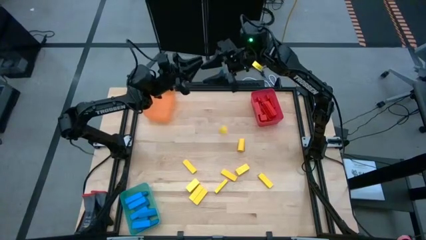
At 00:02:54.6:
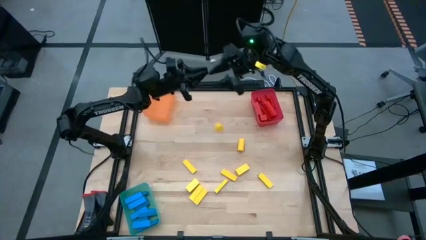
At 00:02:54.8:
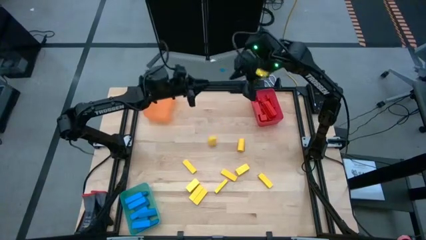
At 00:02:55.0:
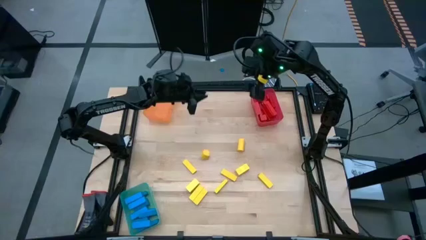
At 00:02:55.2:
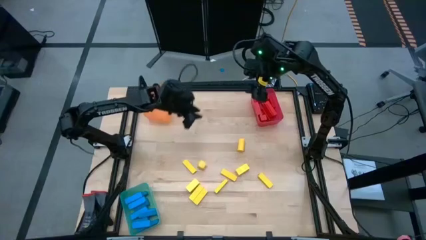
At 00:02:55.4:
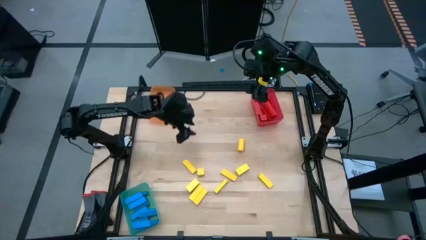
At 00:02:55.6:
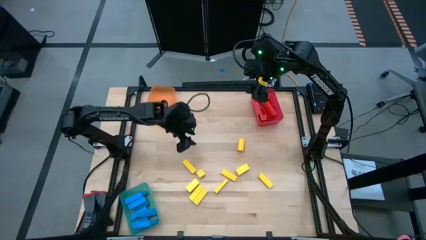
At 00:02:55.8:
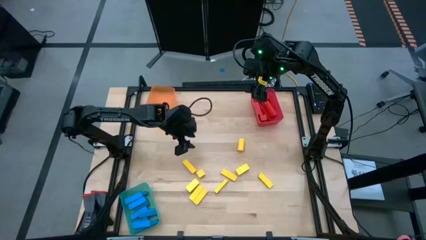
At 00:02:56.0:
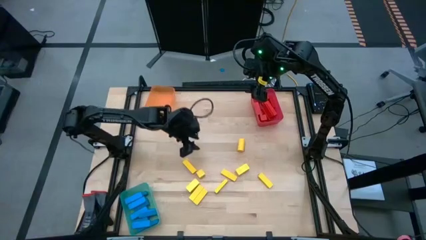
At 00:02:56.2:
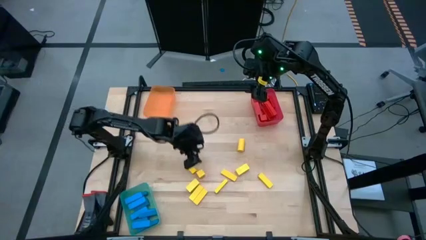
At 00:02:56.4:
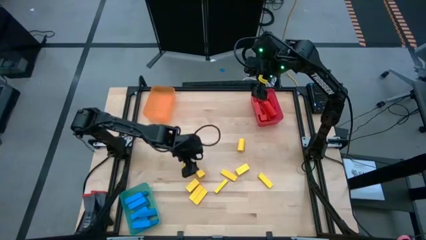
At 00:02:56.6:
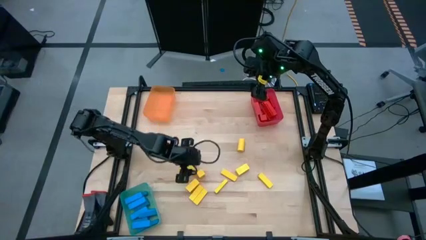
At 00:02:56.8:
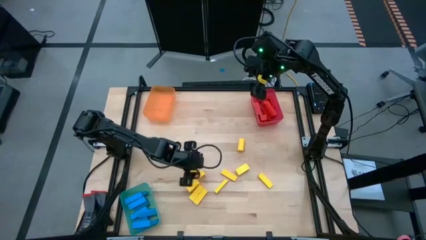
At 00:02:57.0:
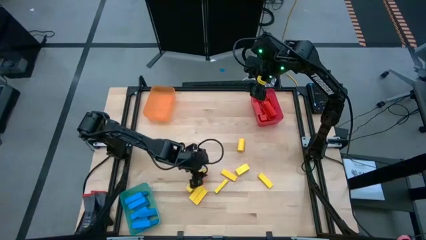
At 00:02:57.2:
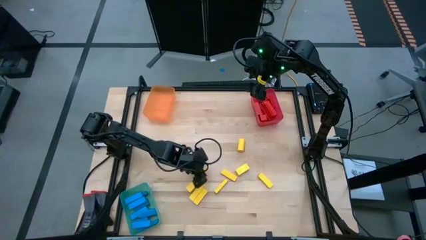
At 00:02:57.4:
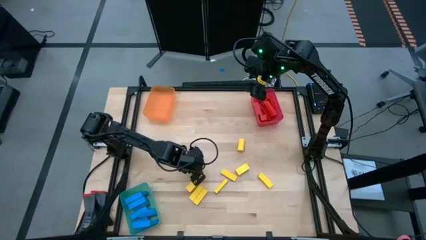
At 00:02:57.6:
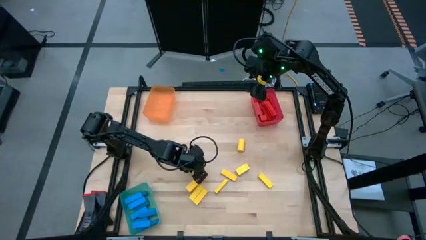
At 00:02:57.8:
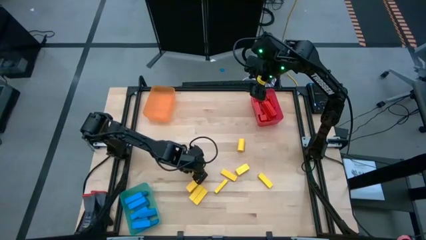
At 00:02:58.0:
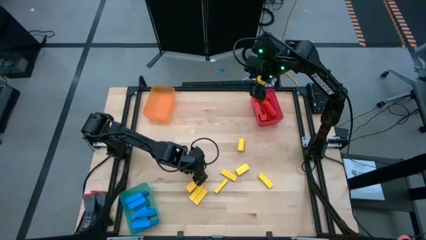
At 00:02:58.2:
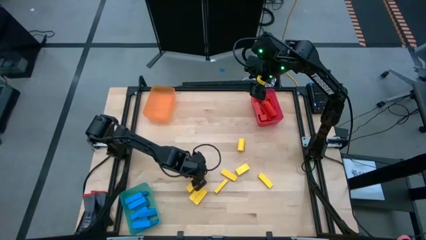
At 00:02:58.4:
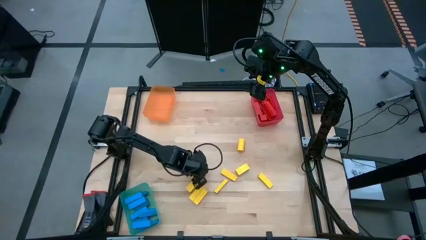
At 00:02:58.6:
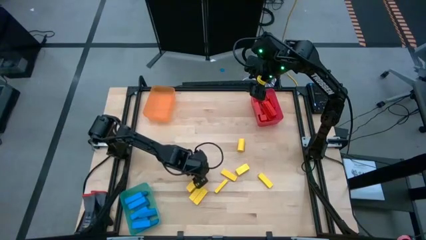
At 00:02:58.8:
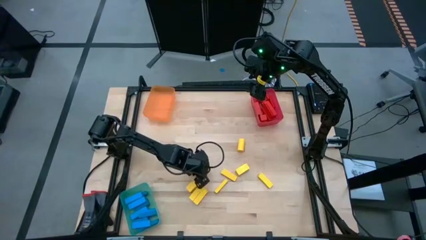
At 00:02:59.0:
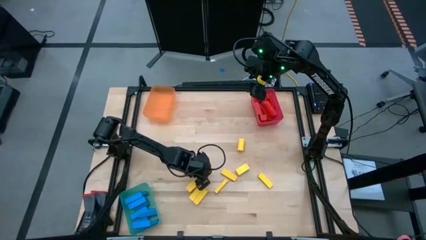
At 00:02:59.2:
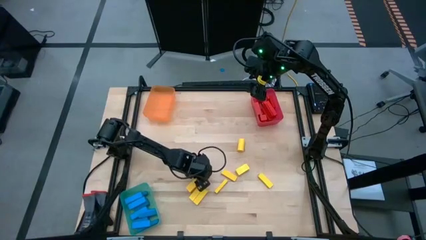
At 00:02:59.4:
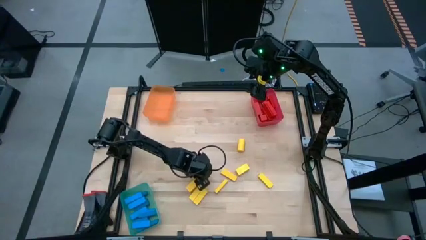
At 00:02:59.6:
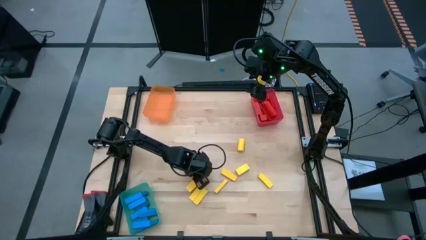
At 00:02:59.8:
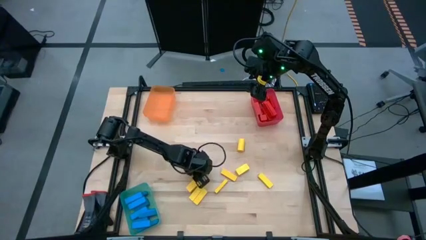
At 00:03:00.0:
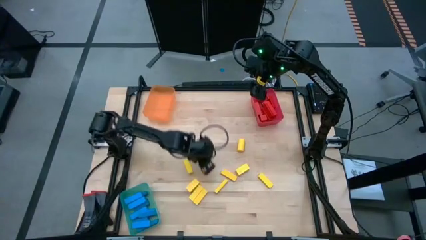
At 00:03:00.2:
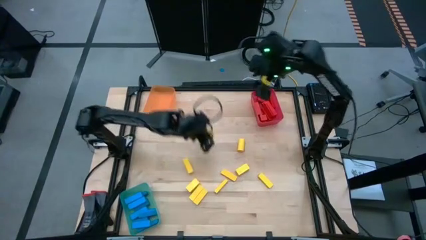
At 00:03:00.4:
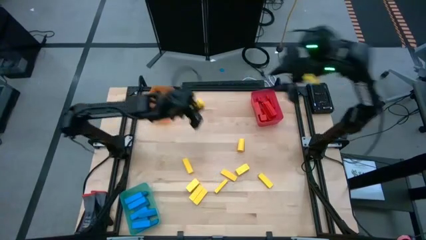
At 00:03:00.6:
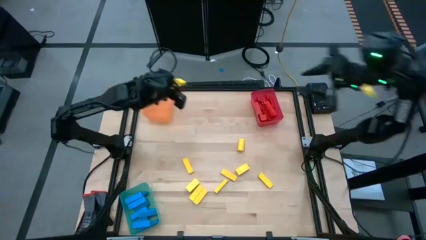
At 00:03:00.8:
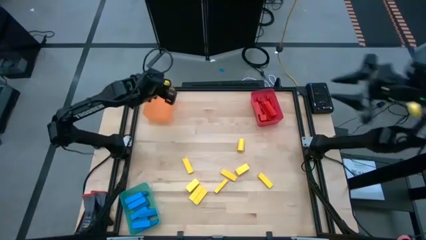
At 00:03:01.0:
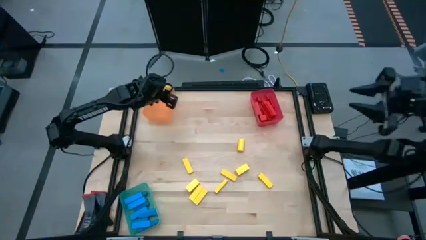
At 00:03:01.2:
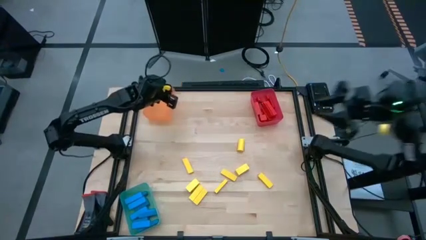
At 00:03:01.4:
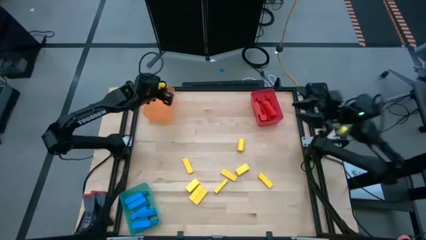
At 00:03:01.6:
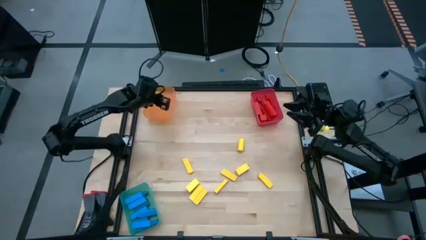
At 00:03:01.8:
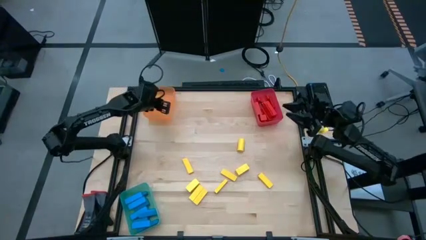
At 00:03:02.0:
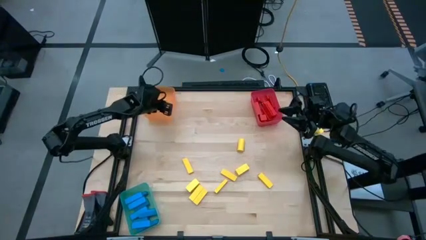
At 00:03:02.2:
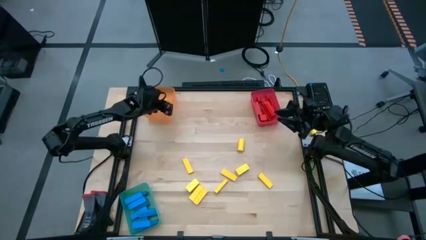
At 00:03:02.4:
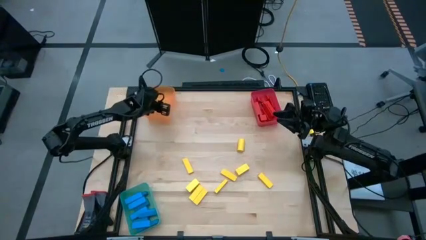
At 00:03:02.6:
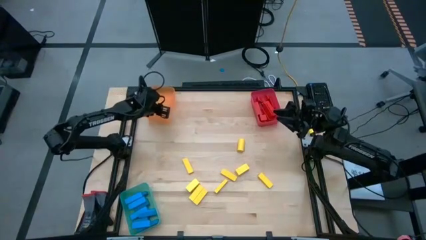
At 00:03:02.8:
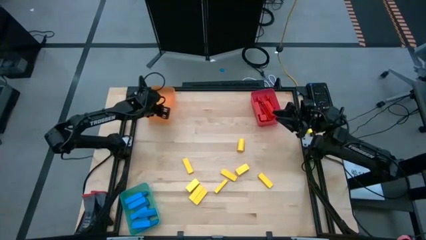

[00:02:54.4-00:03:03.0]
Task: Sort blocks
Put the yellow block into the orange transparent bin

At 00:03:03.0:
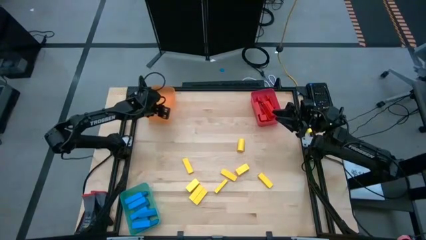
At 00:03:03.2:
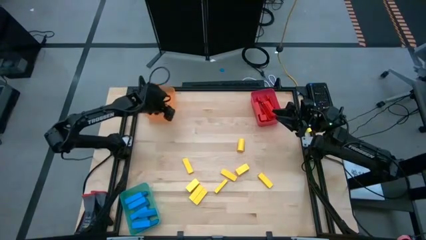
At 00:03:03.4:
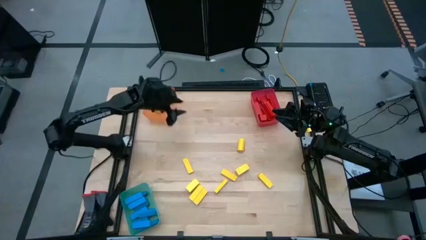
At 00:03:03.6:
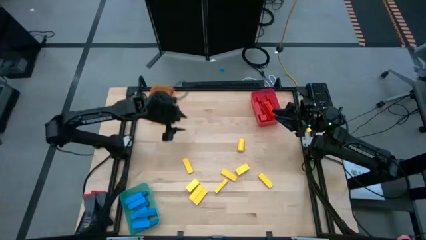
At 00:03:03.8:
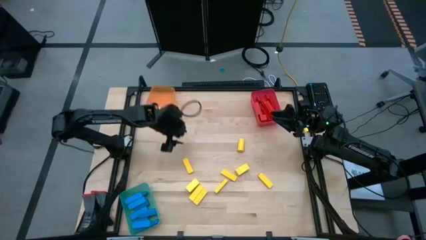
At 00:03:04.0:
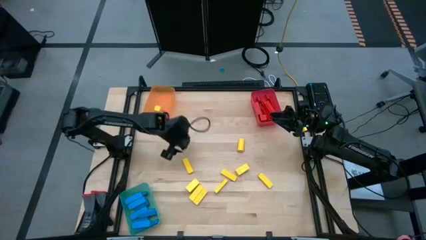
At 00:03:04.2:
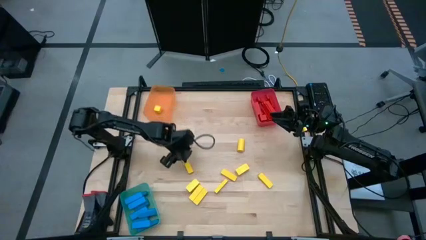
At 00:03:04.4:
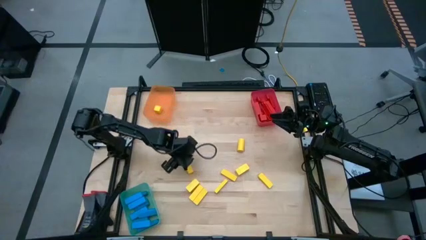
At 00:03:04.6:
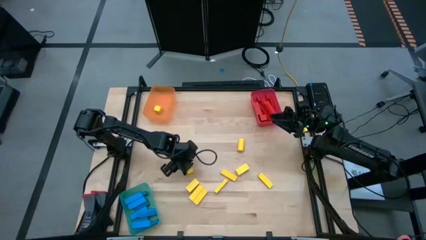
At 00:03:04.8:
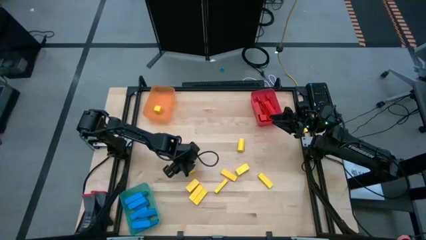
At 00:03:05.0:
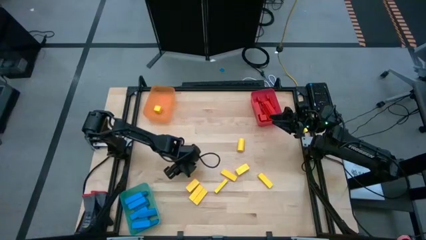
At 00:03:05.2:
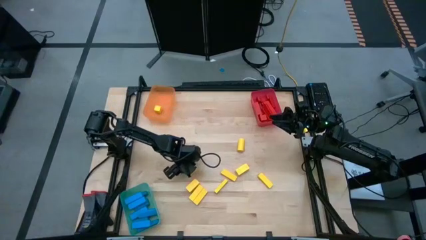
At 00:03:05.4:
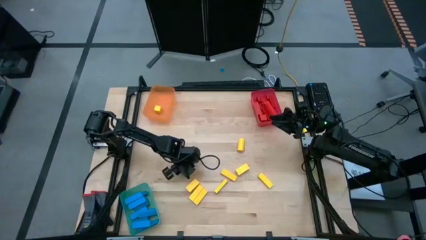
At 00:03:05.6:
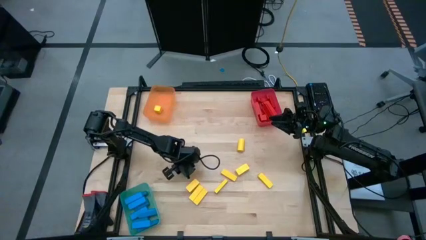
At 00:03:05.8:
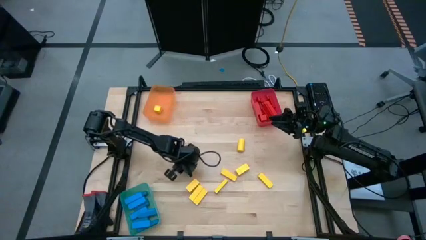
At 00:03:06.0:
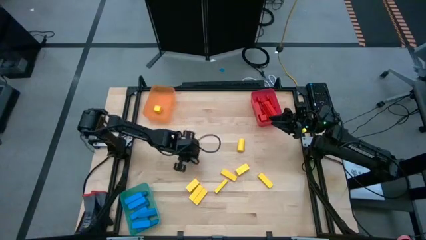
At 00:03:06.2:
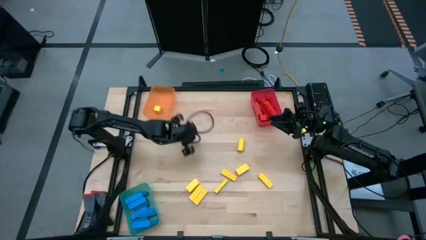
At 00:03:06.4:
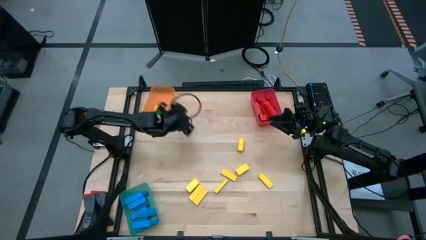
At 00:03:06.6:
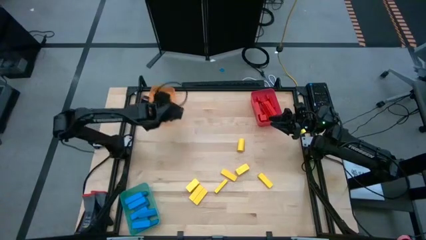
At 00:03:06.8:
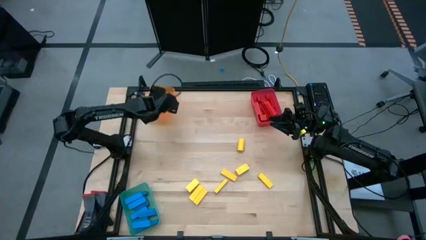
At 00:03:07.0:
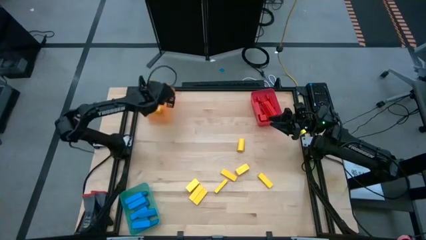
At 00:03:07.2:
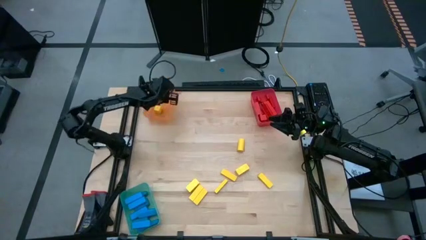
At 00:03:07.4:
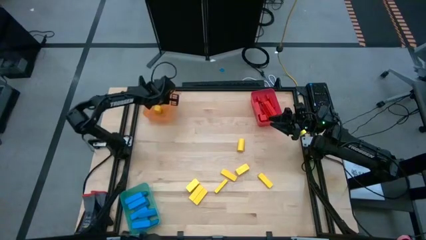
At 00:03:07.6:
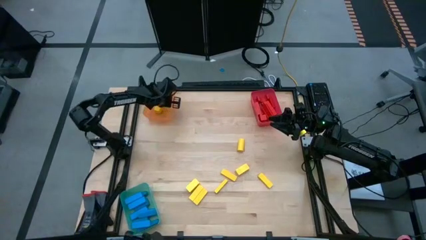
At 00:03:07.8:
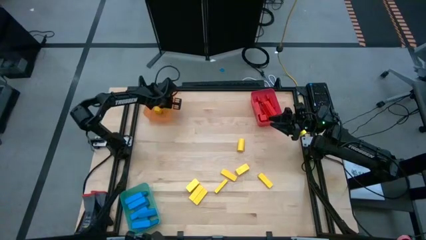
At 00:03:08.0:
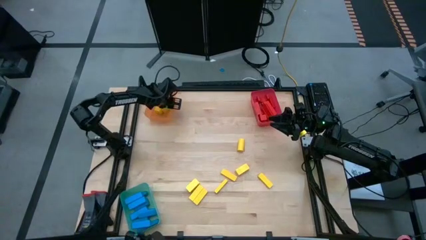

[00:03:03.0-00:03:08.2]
Put the yellow block into the orange transparent bin
